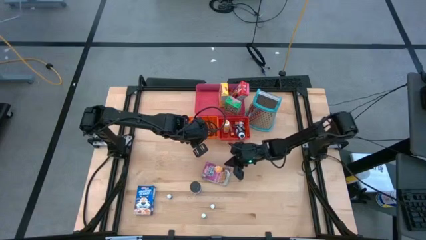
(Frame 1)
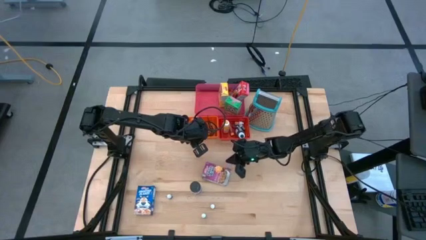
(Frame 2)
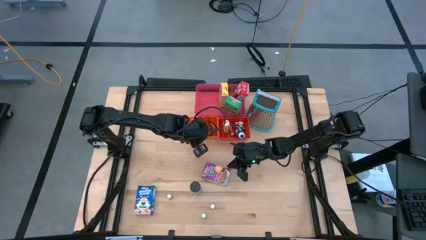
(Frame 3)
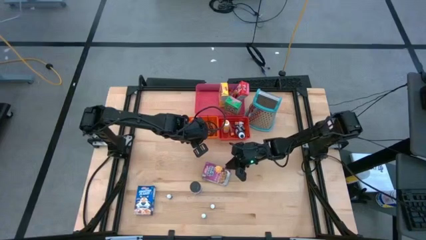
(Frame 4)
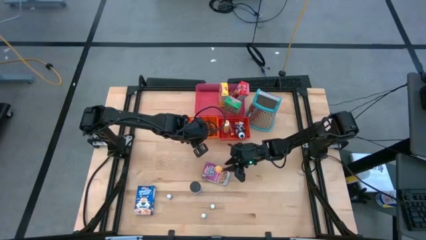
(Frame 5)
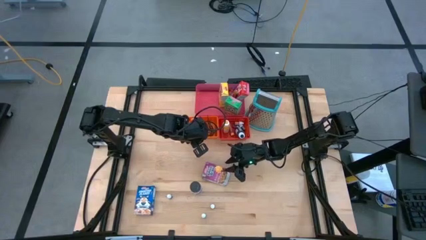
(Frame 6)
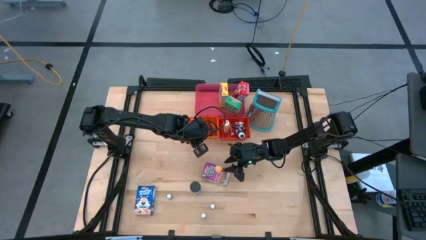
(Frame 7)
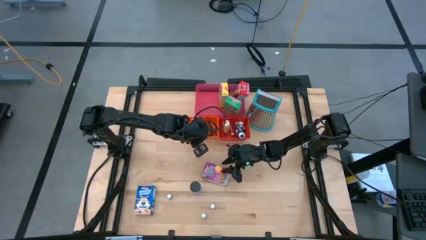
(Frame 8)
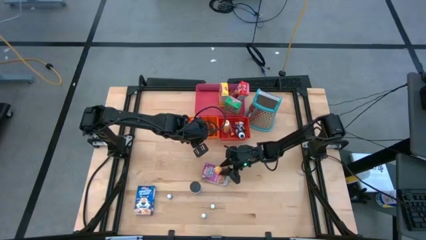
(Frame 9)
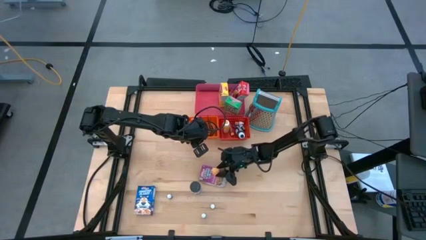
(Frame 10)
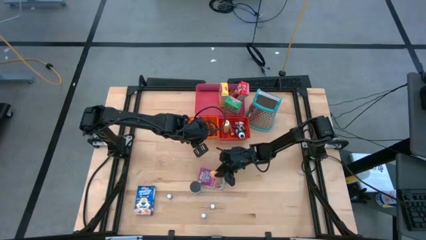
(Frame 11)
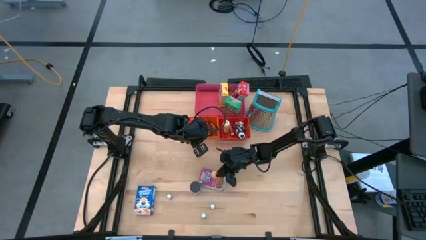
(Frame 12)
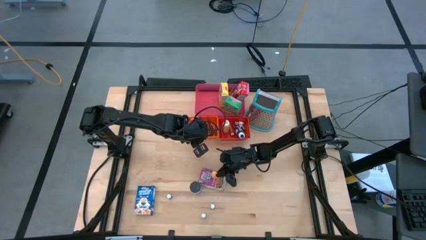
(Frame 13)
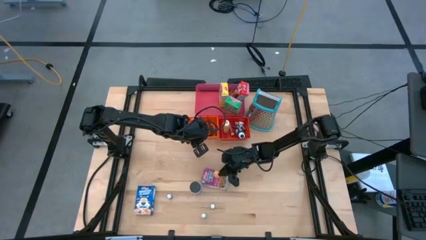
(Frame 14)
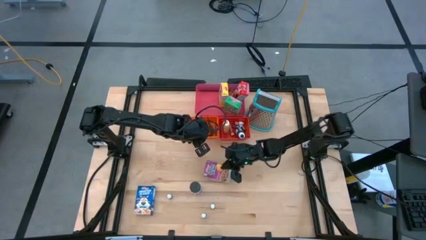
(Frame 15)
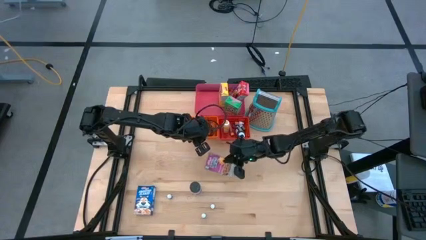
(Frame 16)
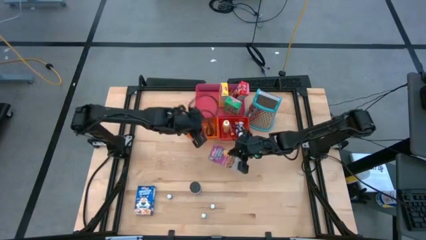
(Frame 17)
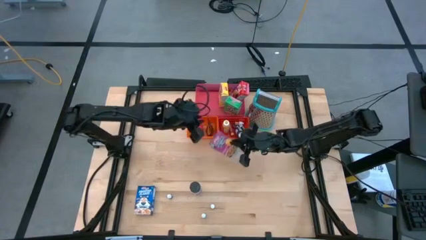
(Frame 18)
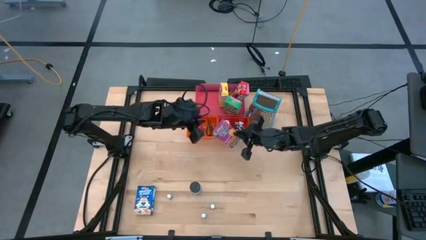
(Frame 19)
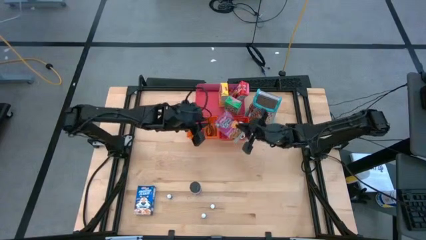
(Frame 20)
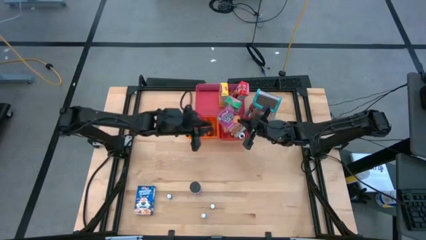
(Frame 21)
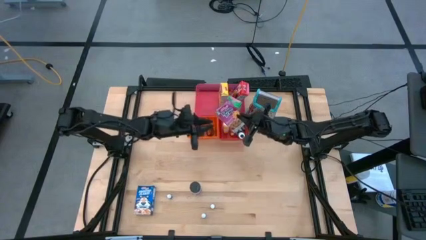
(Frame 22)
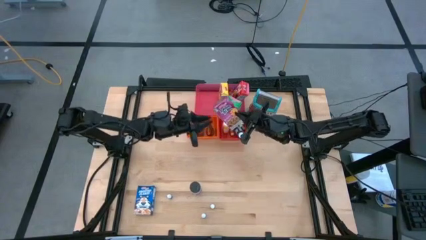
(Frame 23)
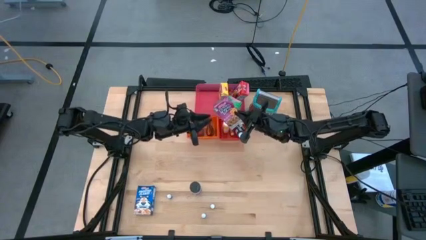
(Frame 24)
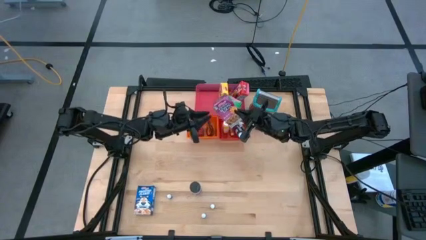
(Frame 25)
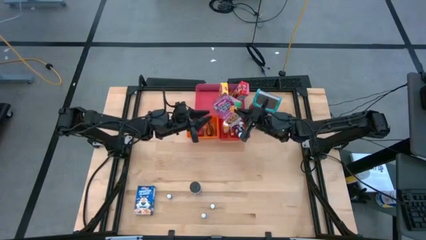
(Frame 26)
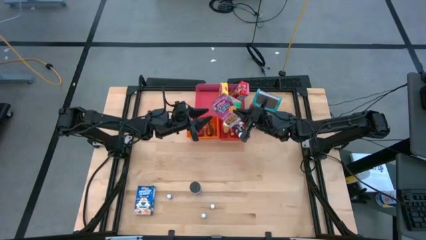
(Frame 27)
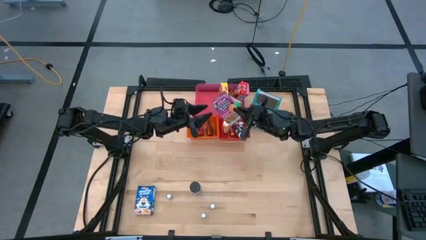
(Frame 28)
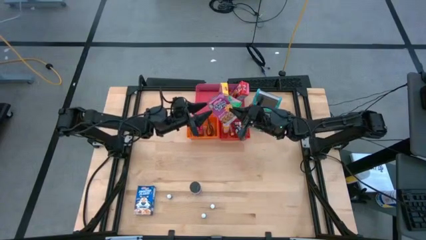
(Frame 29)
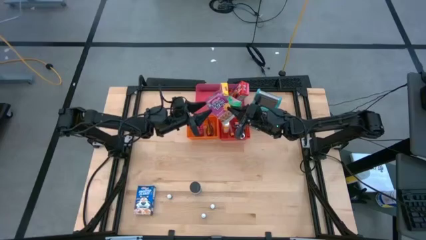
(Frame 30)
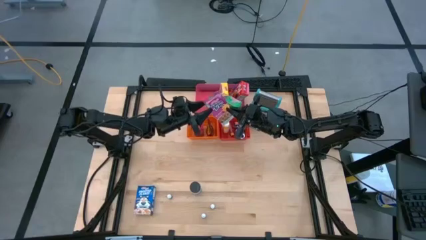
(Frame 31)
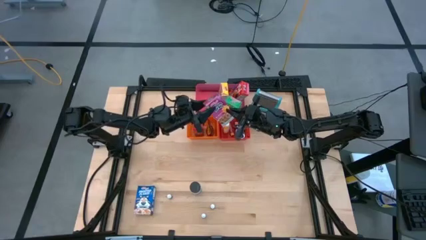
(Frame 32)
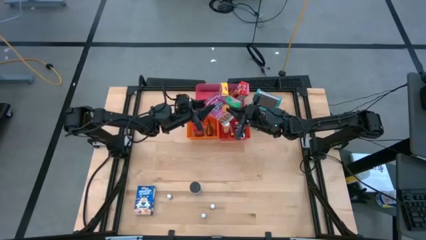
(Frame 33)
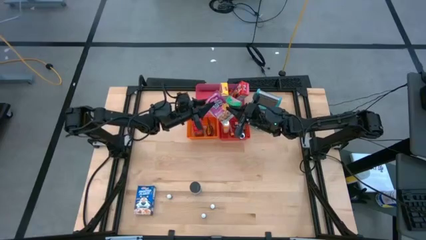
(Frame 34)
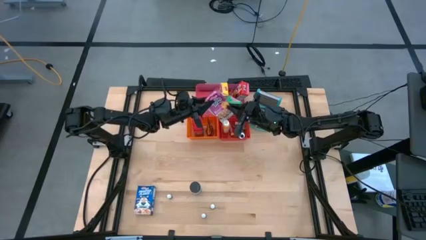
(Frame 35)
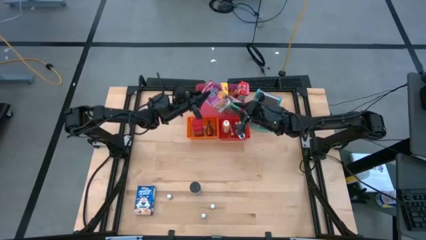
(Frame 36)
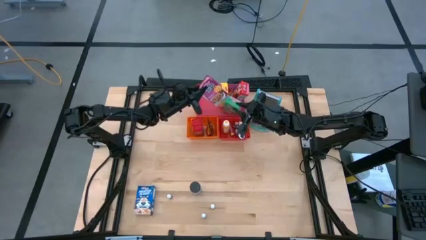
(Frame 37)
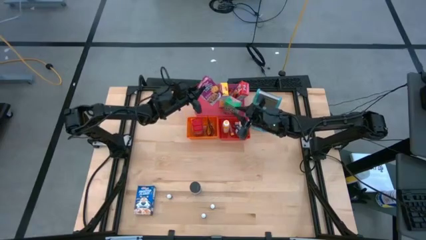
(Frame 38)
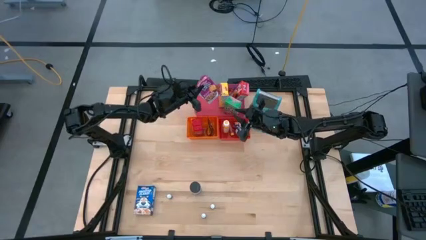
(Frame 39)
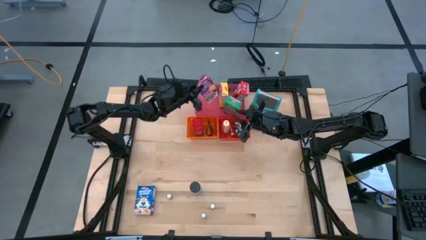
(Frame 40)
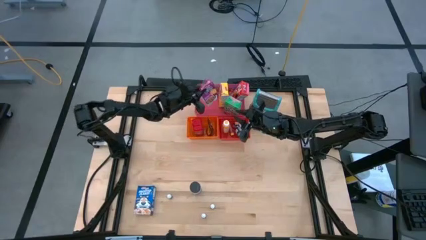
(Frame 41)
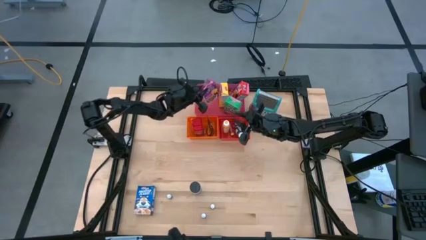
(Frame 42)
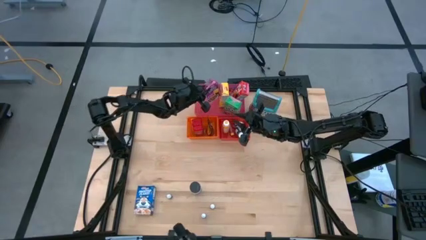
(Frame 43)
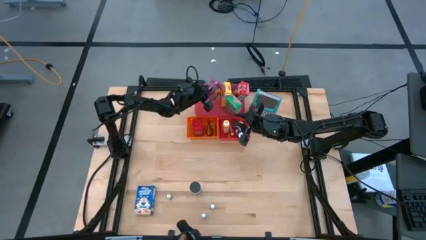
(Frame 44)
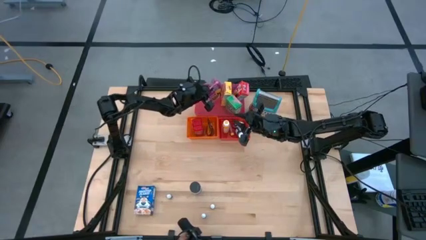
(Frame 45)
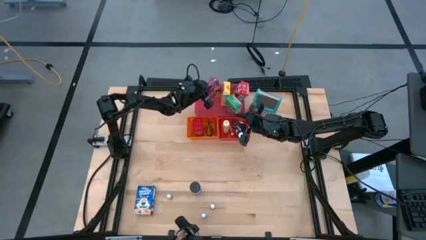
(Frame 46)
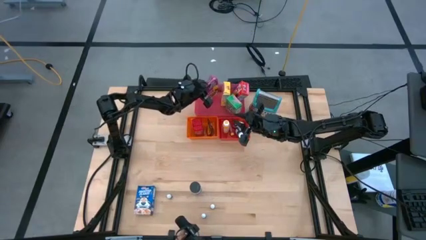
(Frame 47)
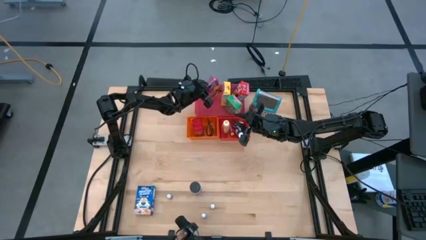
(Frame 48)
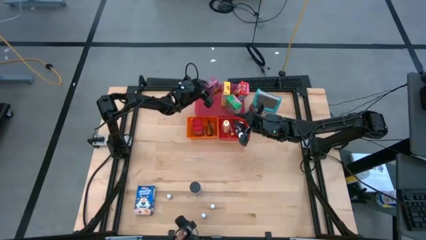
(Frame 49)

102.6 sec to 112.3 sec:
Task: Pick & Place Kitchen Items
Put the violet cereal box into the pink bin

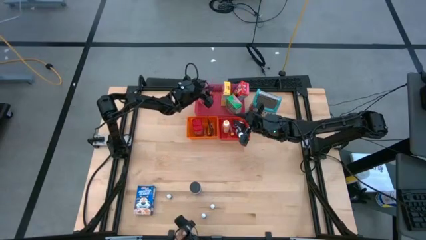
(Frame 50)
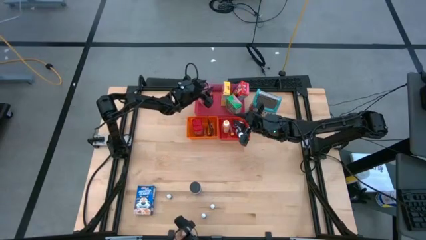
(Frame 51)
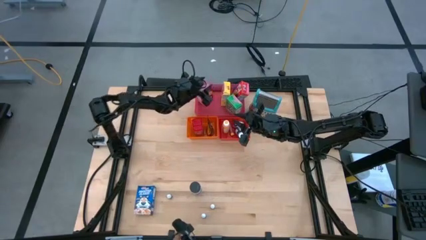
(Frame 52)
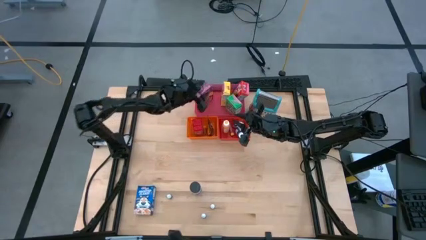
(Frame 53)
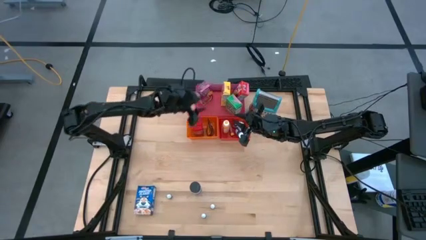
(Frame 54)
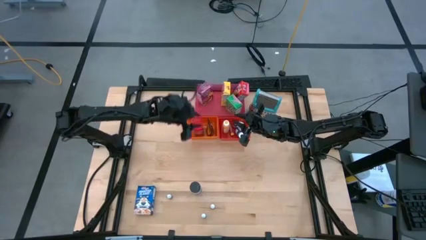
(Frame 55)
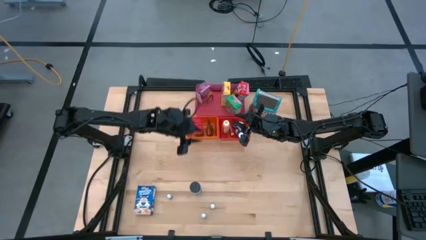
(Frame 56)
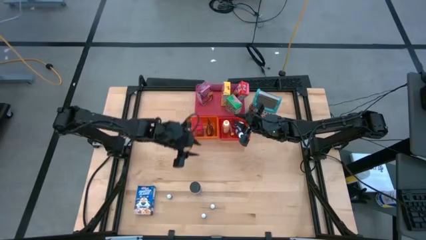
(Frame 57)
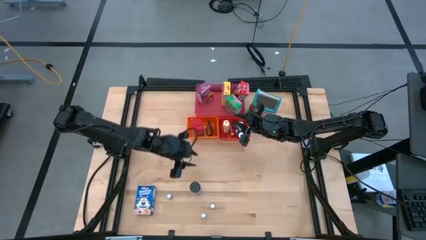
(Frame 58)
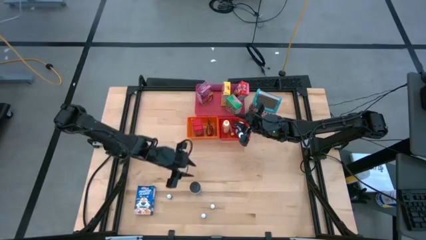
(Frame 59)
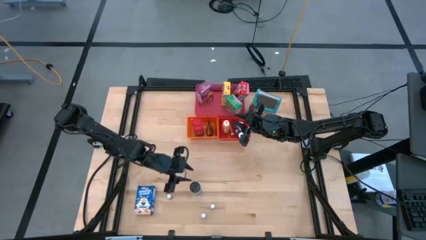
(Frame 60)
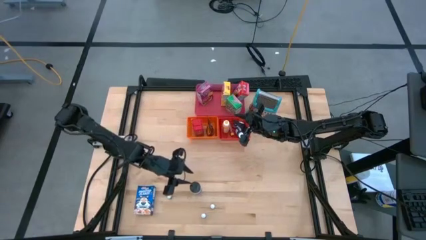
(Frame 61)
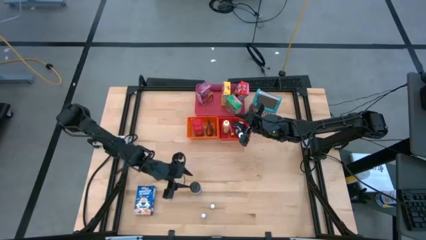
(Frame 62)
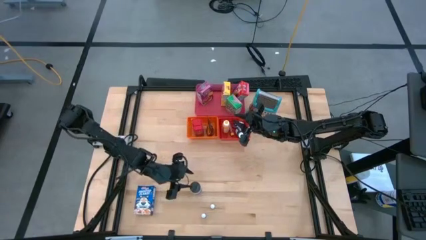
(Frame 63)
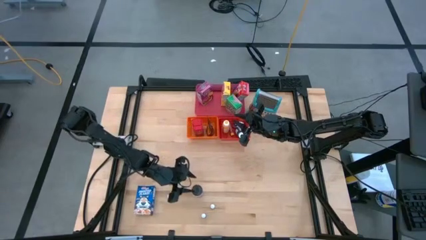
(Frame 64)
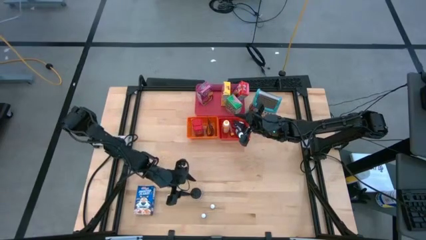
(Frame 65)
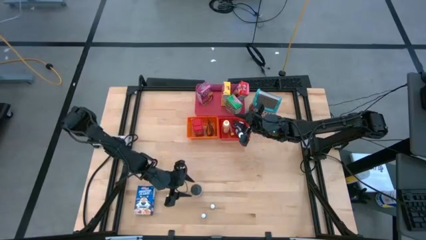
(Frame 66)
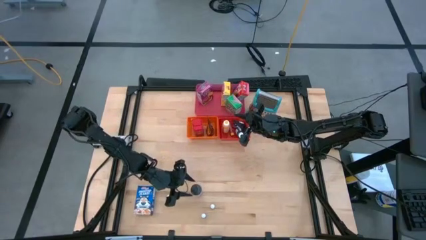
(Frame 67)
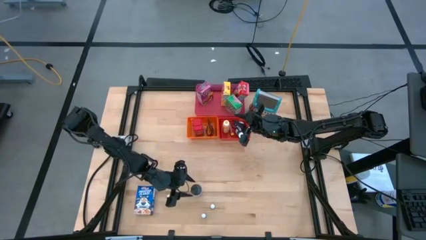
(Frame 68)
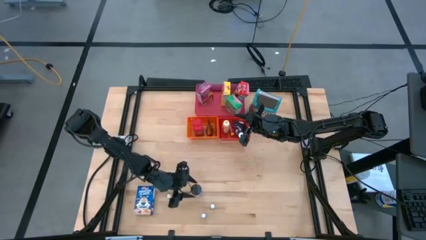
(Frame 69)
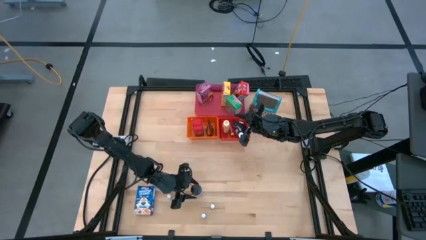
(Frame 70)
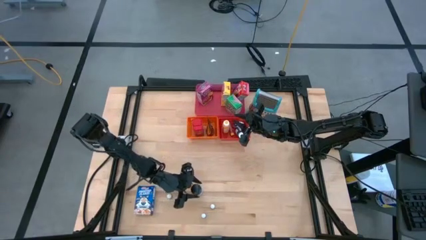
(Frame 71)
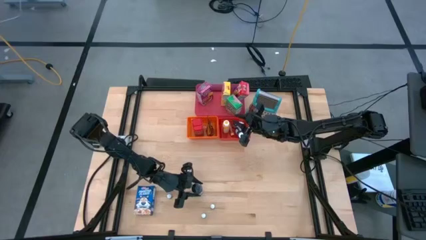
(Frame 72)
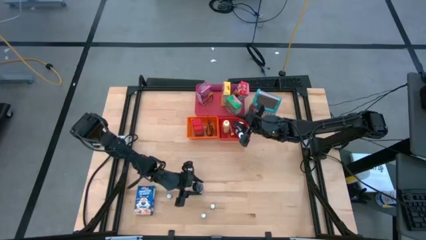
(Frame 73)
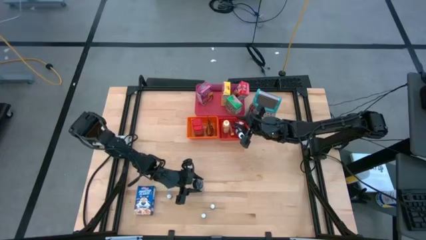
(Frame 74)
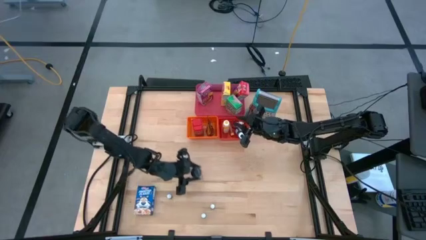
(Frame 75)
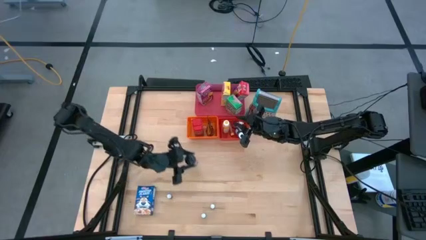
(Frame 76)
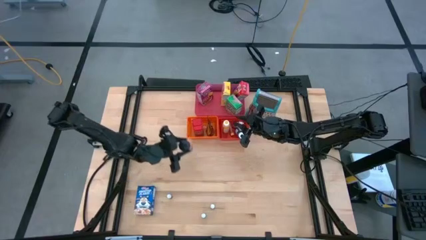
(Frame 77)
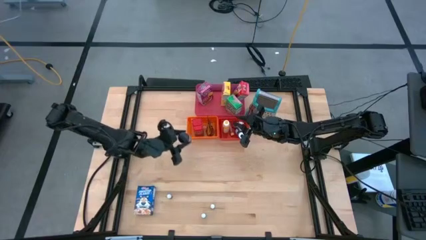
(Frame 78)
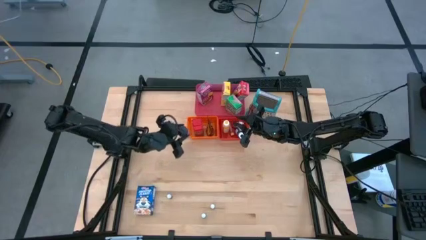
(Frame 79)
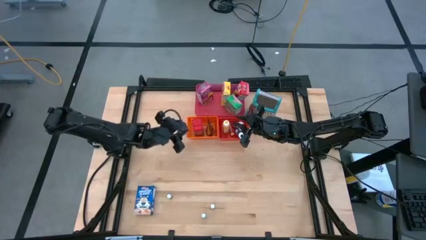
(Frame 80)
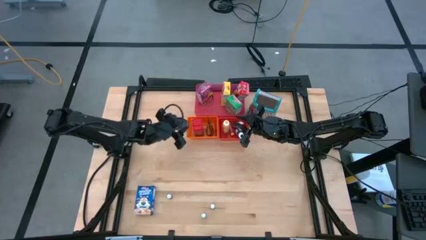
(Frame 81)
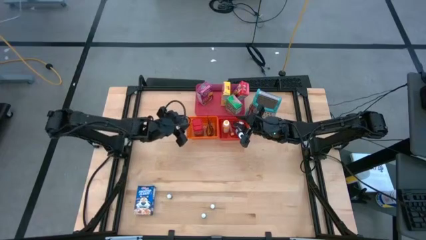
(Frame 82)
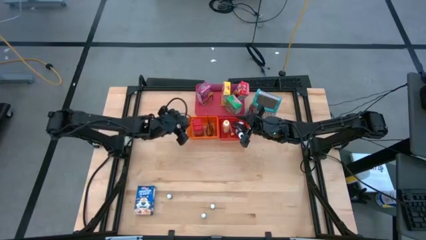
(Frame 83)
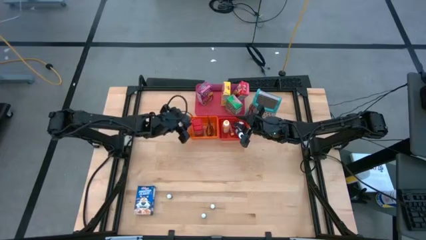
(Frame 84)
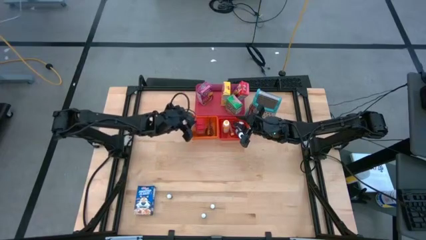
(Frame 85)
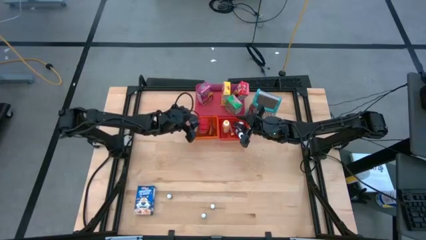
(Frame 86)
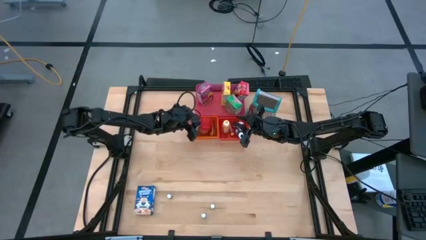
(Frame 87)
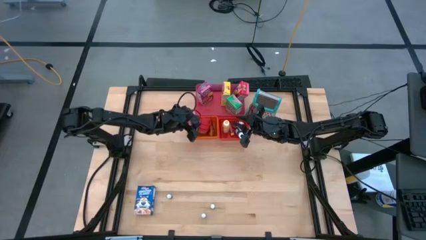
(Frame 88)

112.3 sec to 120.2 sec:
Put the violet seasoning bottle into the orange bin
